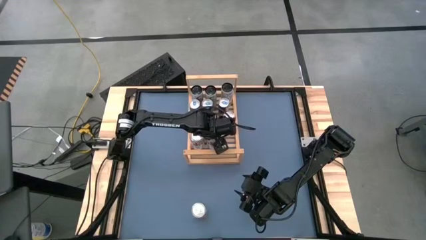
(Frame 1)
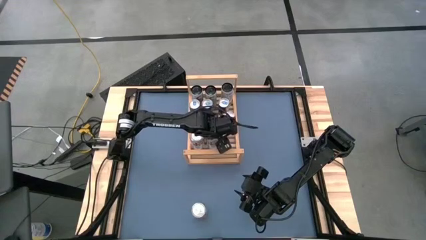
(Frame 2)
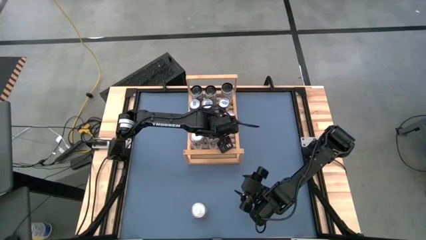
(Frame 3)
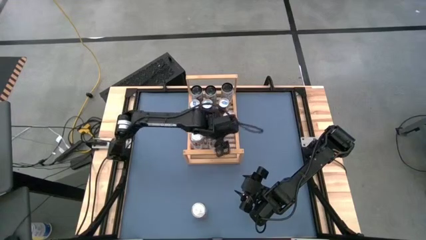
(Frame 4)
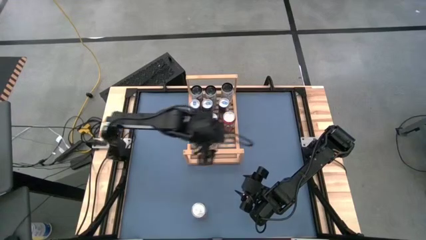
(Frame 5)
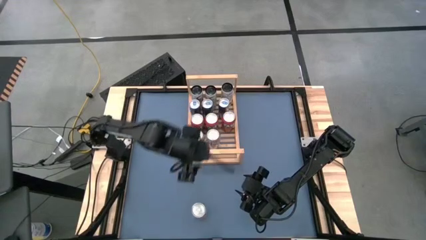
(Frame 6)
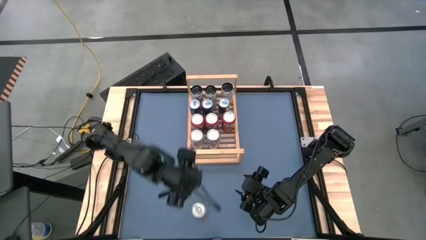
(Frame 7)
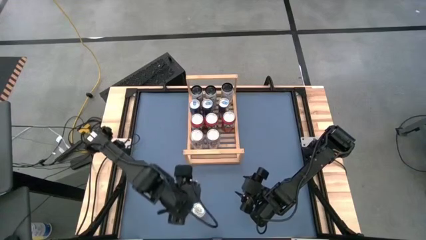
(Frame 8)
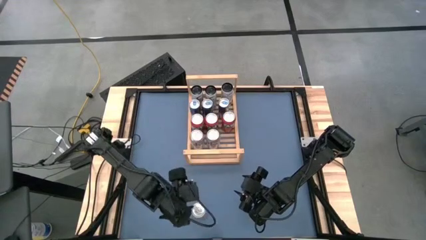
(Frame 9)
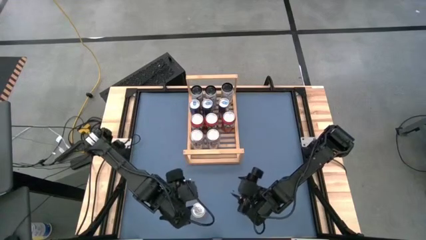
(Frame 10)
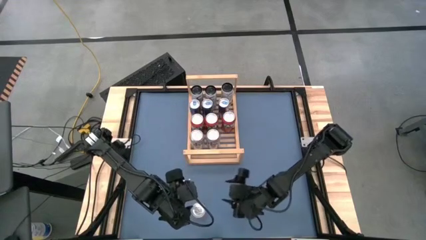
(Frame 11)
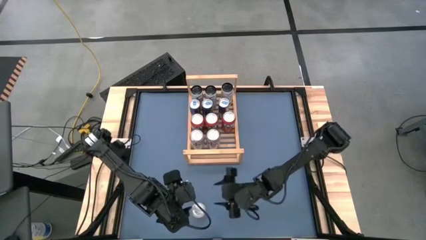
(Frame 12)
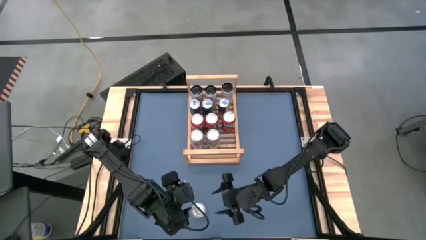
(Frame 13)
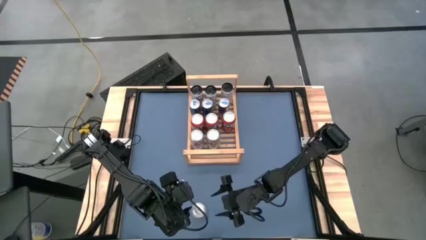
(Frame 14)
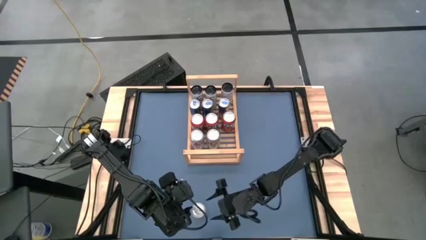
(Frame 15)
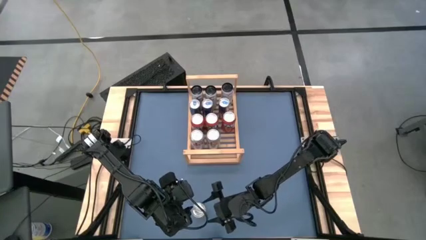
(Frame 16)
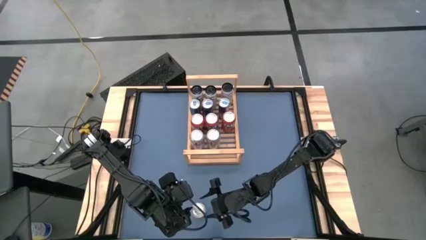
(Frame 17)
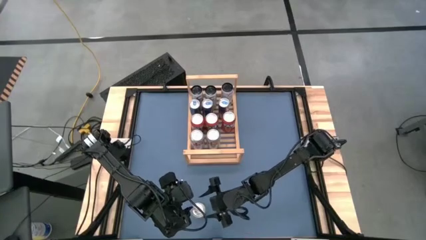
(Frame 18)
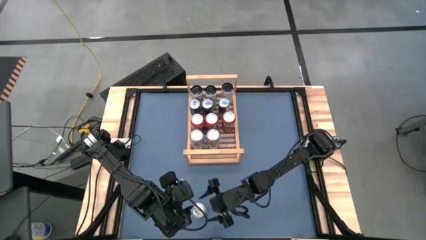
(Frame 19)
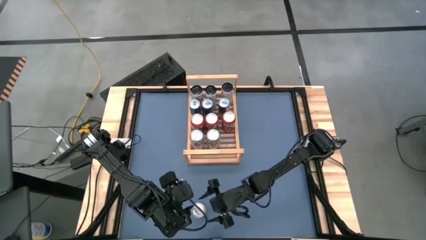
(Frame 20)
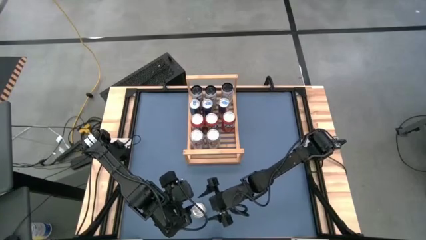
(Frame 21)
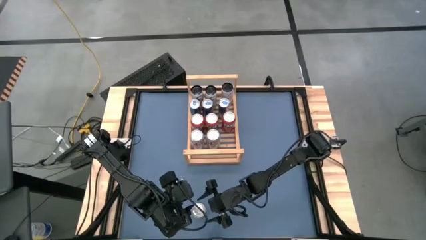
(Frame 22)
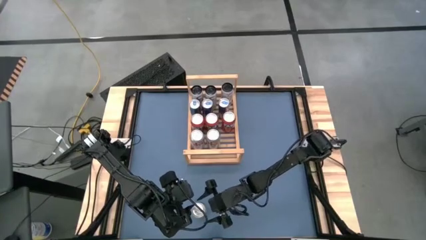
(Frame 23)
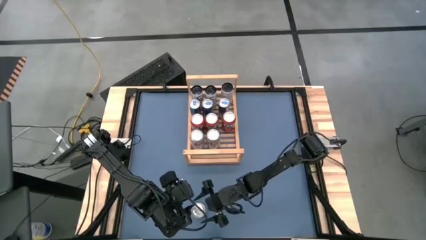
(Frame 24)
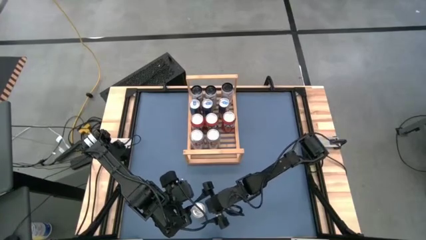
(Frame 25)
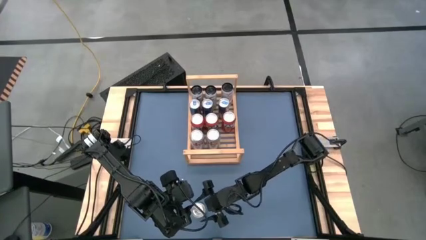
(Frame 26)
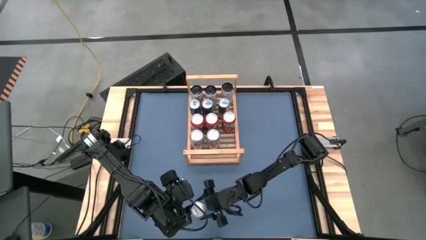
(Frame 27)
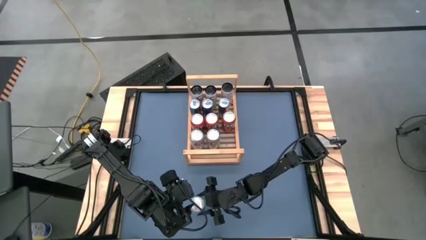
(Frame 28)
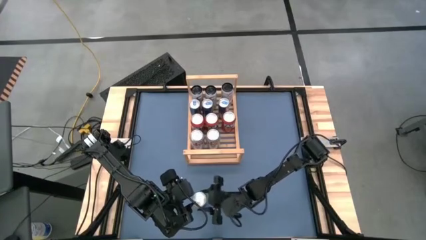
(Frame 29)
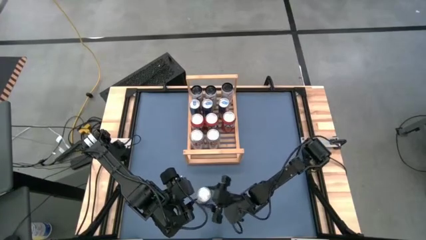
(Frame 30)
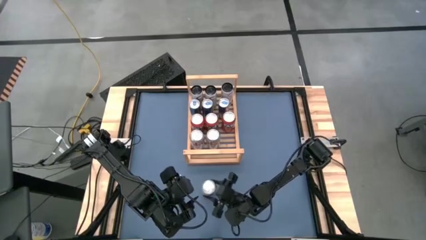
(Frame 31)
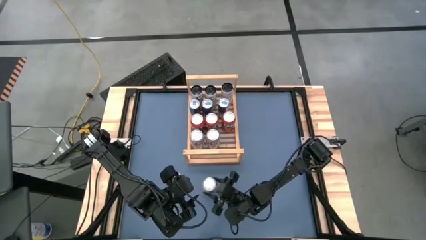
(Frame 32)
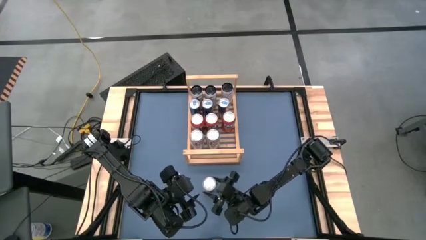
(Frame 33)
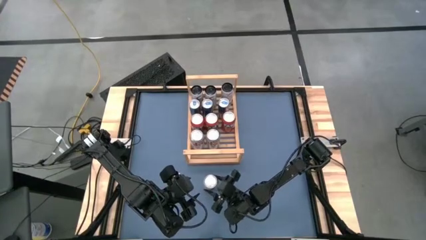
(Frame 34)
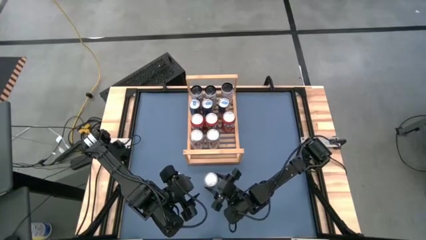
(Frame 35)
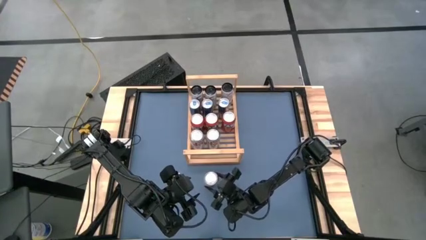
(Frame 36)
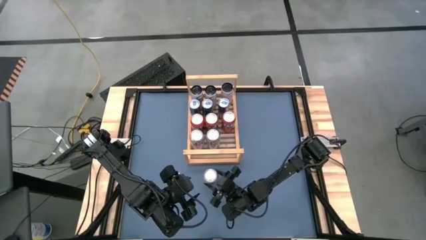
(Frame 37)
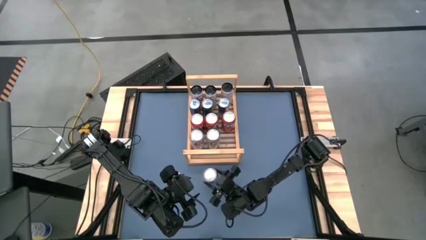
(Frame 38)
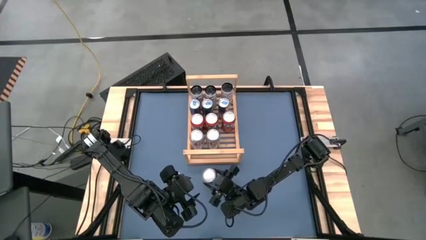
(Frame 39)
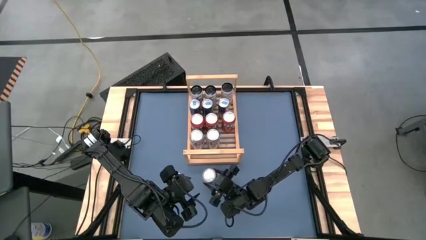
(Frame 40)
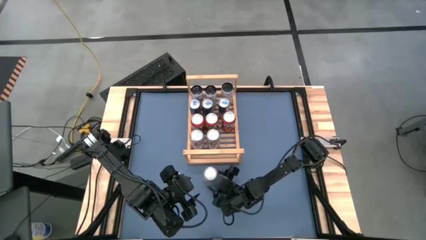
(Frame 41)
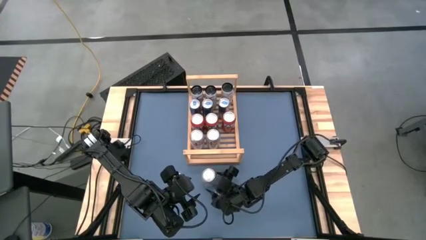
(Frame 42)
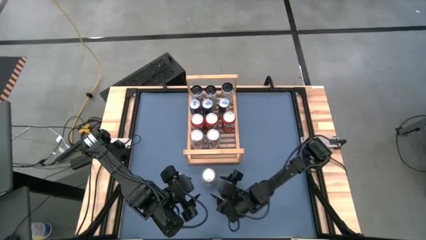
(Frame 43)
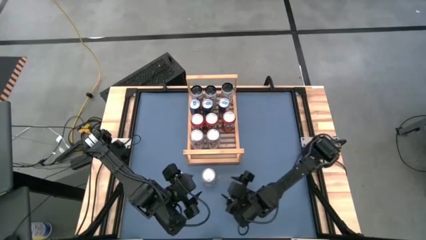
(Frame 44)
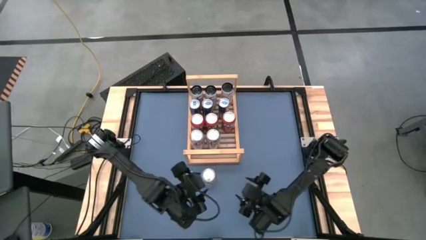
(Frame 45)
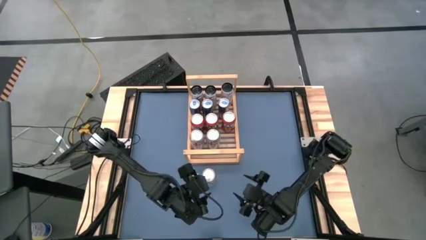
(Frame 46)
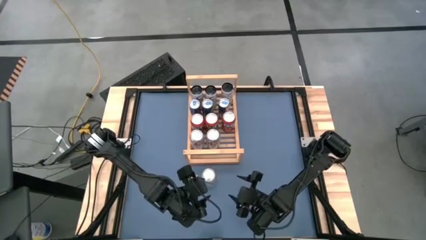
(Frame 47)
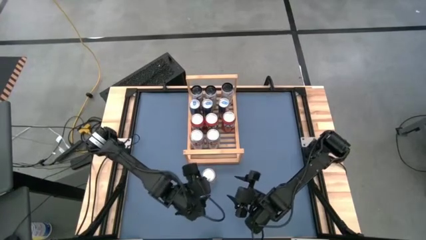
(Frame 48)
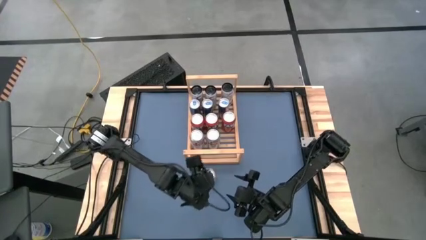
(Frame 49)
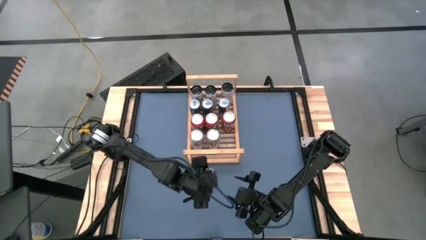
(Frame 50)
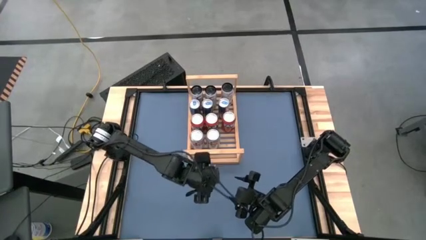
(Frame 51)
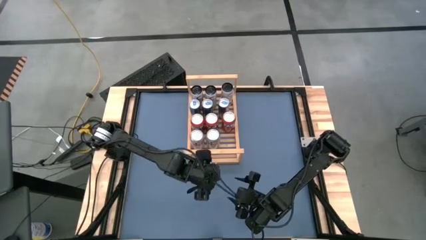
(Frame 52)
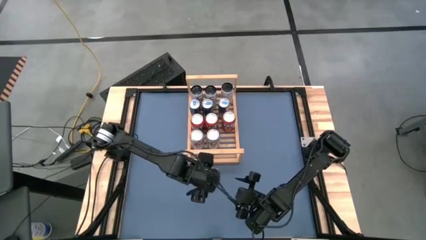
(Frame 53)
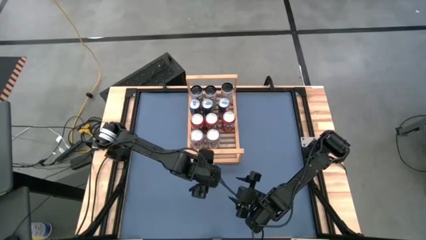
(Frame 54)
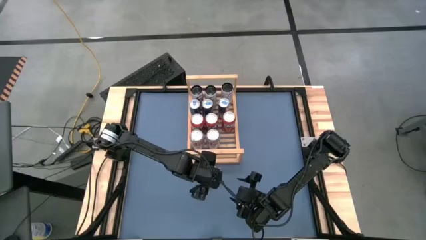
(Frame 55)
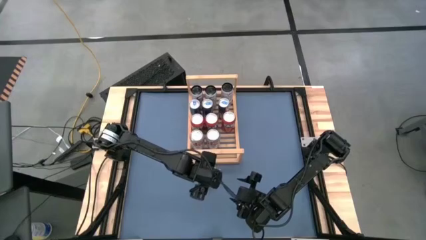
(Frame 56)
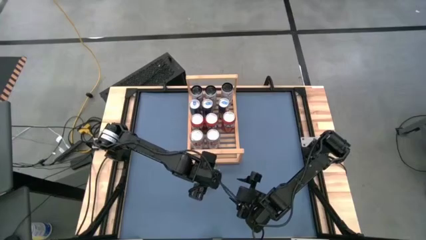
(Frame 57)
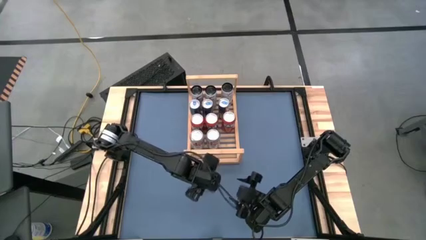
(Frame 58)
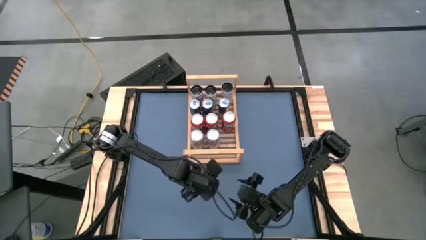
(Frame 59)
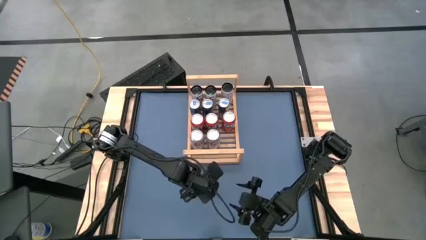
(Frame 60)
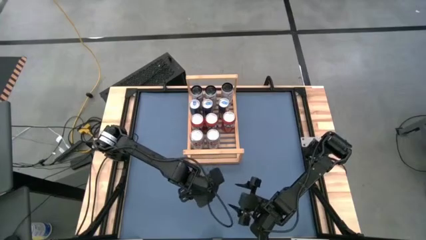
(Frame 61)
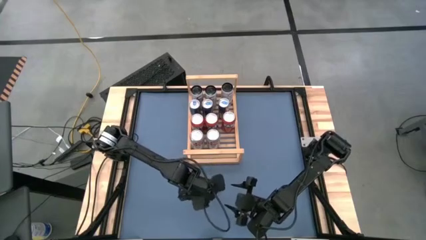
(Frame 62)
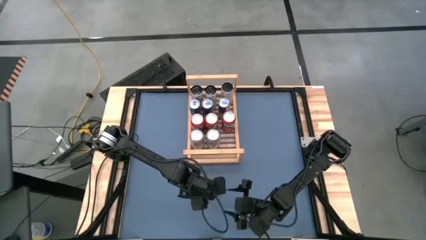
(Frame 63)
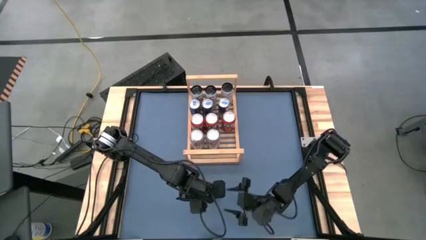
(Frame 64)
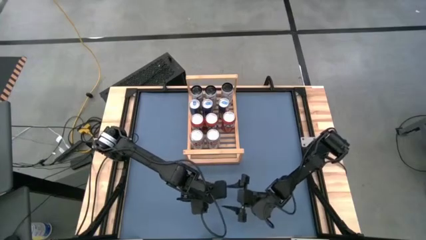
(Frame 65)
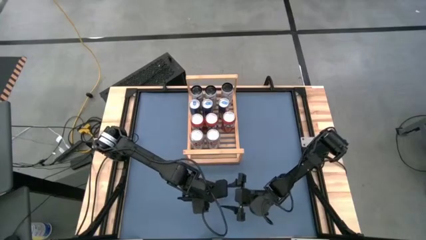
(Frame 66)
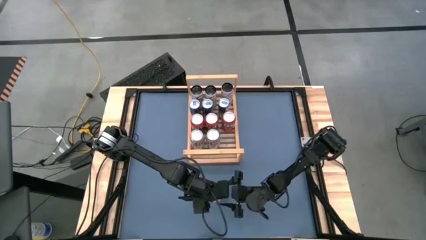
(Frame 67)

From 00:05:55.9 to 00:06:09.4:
Task: Place canned beverage on shelf
Put the silver can on the shelf aligned with the other silver soda cans

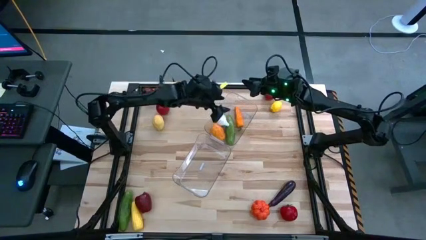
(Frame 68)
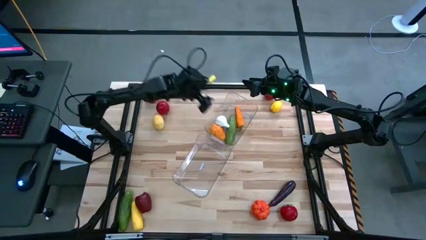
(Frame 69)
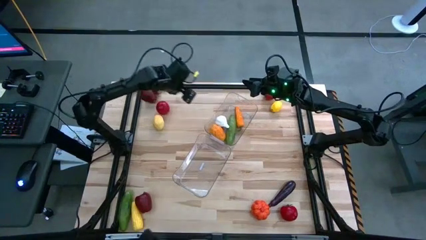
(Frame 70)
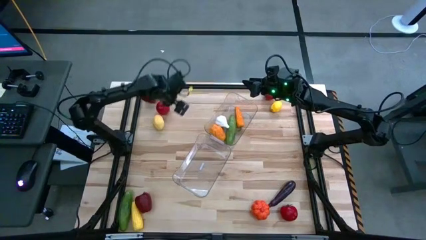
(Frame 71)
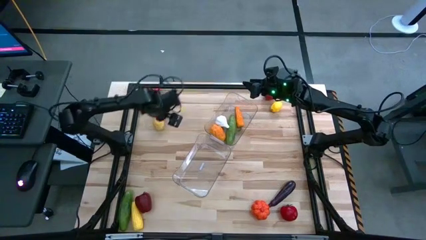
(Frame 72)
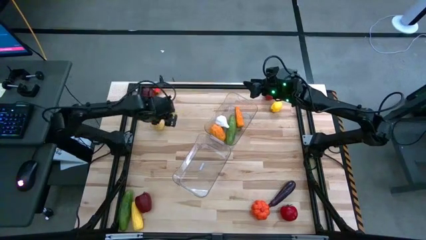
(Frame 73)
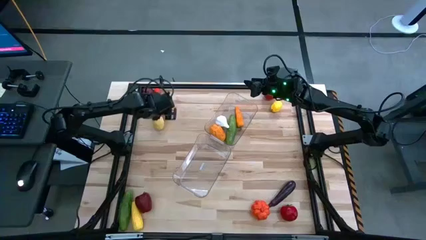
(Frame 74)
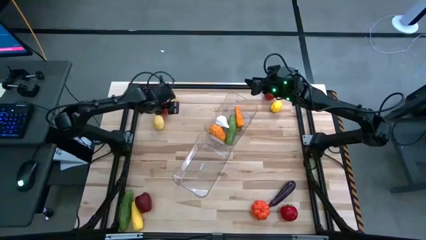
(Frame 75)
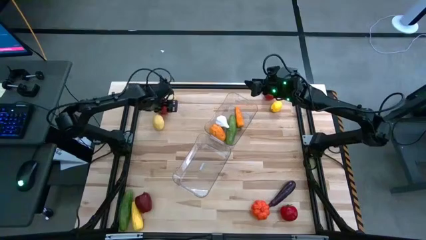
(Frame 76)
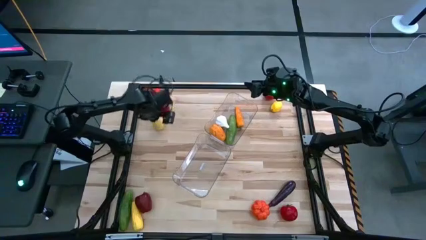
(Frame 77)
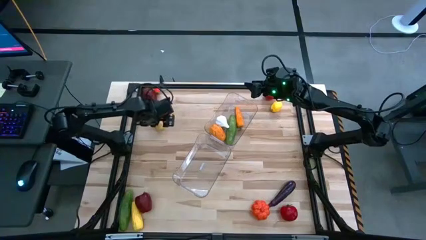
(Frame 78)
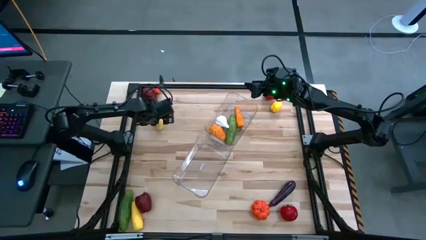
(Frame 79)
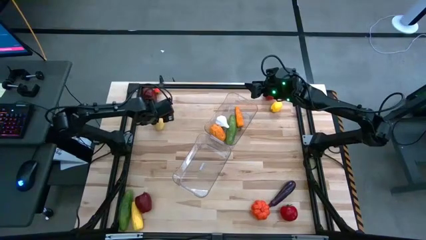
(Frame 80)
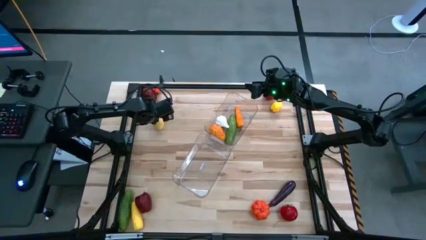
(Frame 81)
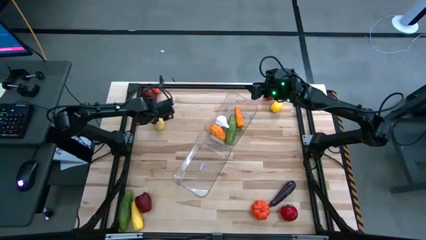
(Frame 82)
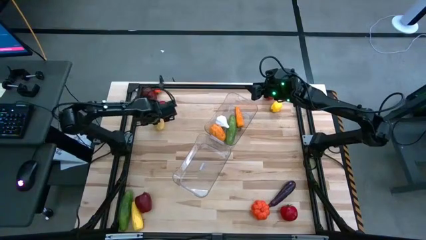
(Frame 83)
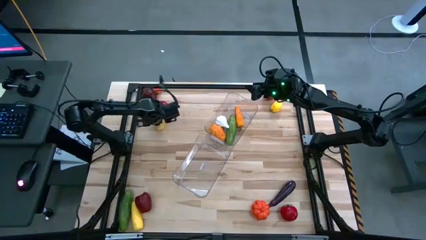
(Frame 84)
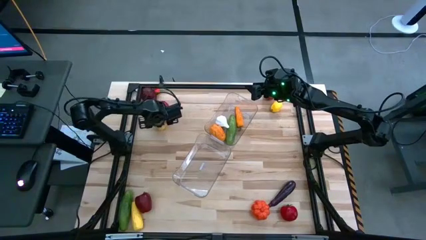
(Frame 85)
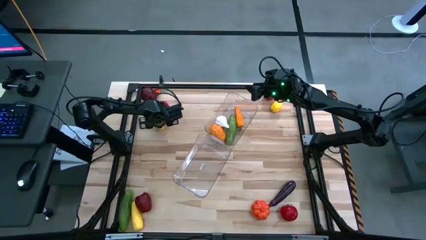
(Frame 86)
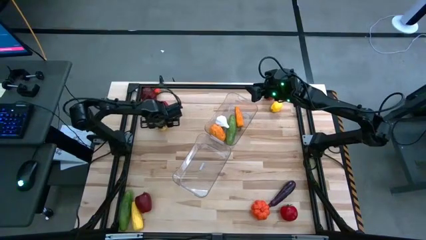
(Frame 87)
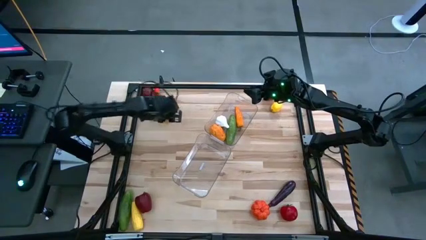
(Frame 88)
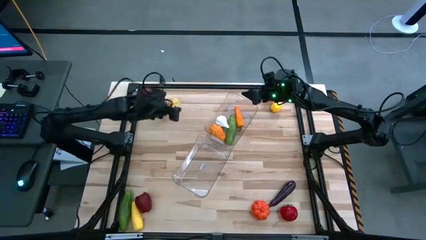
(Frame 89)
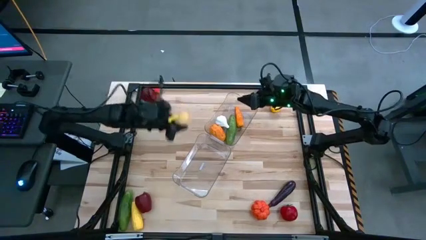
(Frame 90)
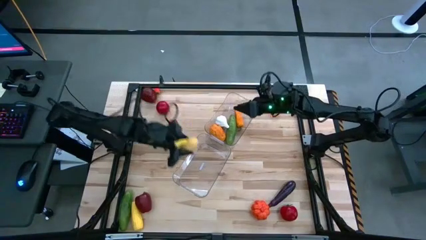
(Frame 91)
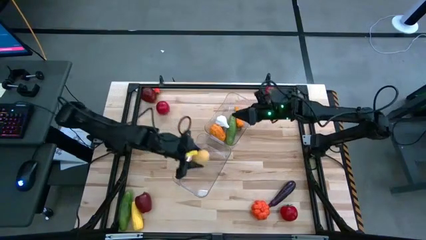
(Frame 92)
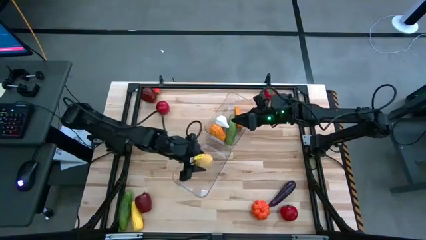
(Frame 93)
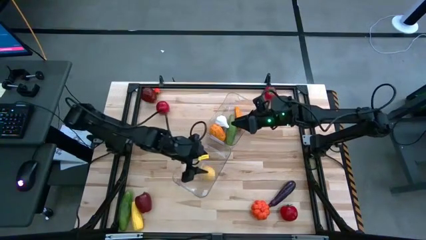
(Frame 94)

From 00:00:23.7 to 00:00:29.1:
Task: Sort produce into baskets
Put the yellow lemon into the bottom transparent bin
